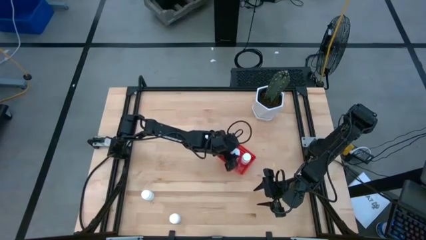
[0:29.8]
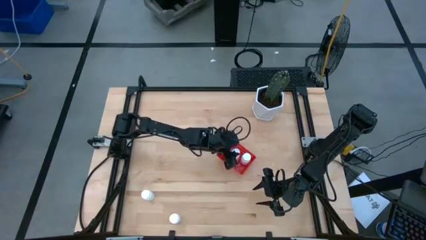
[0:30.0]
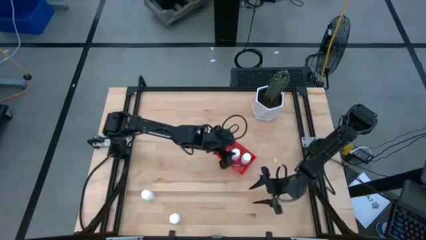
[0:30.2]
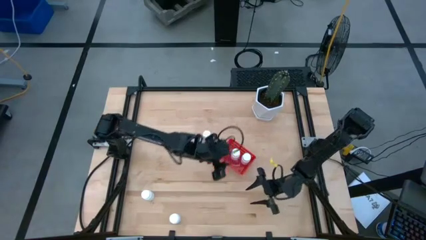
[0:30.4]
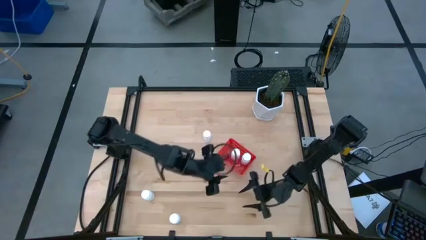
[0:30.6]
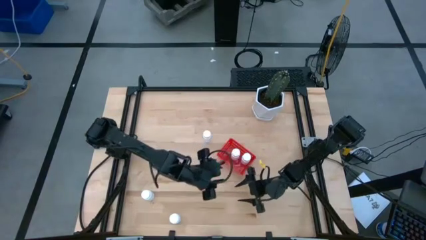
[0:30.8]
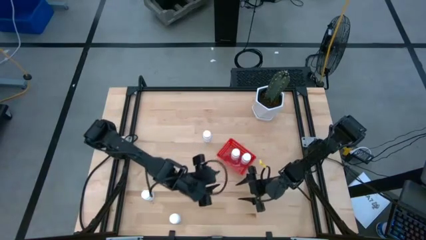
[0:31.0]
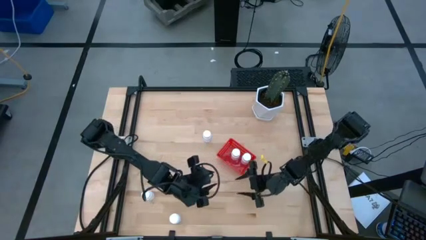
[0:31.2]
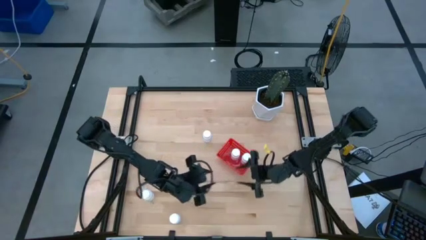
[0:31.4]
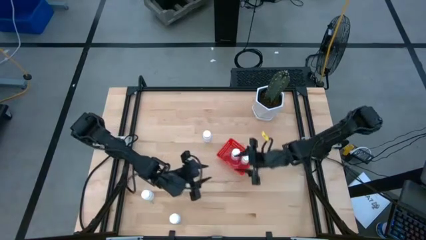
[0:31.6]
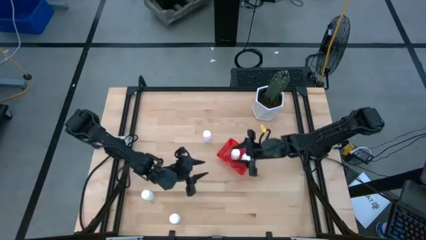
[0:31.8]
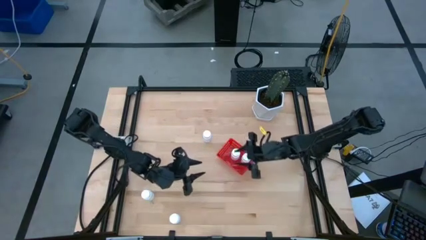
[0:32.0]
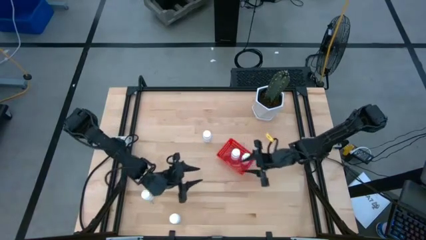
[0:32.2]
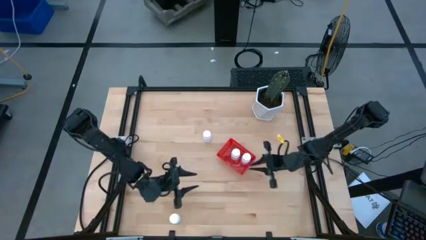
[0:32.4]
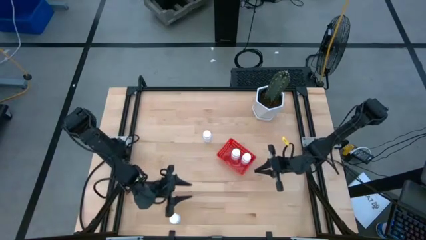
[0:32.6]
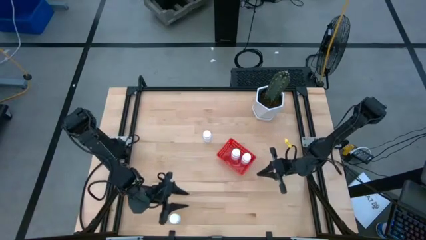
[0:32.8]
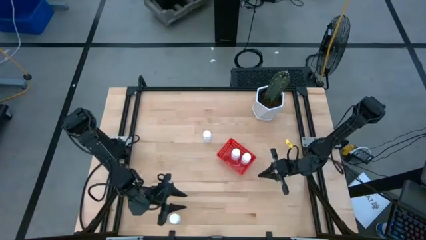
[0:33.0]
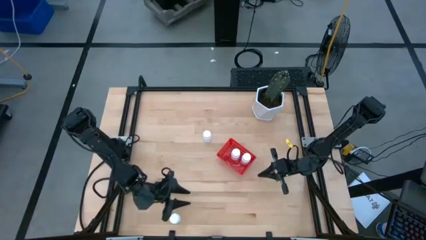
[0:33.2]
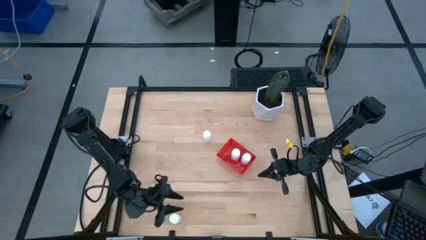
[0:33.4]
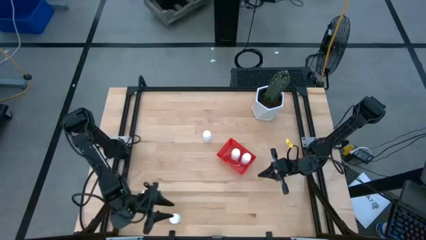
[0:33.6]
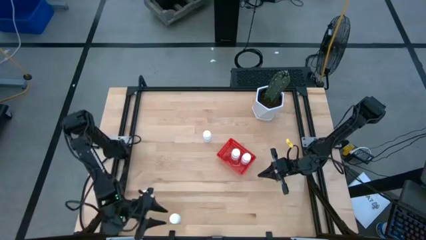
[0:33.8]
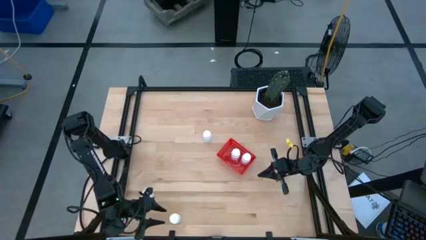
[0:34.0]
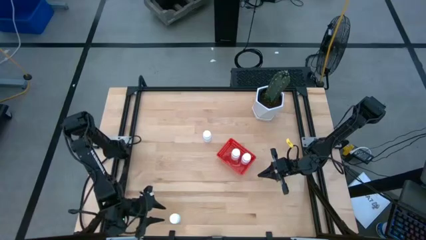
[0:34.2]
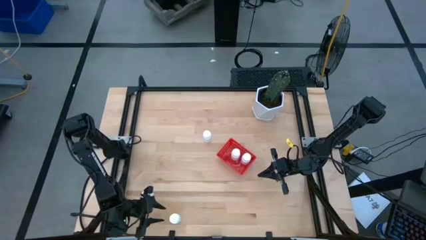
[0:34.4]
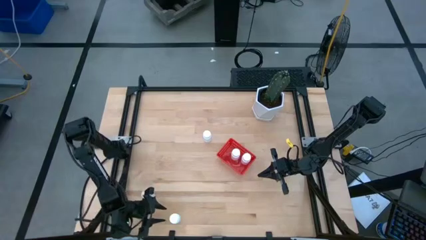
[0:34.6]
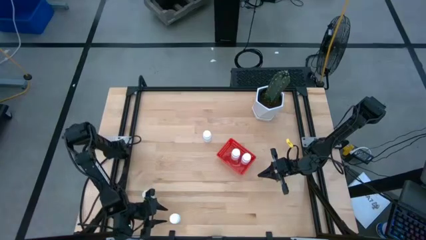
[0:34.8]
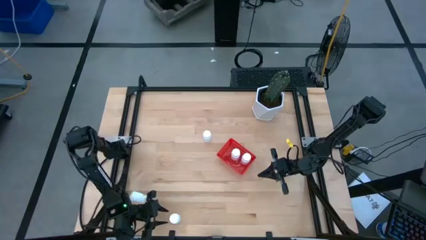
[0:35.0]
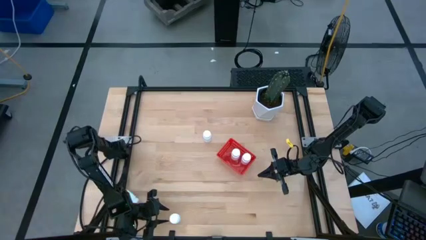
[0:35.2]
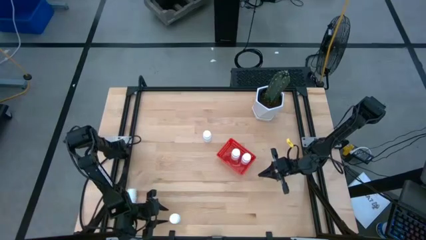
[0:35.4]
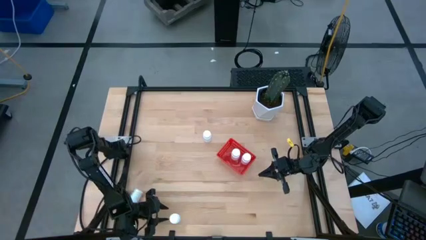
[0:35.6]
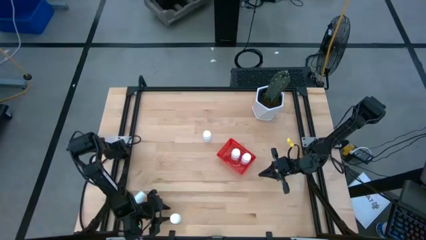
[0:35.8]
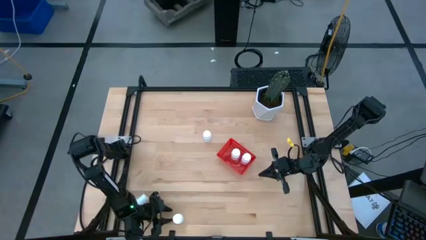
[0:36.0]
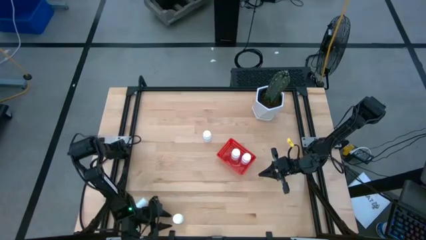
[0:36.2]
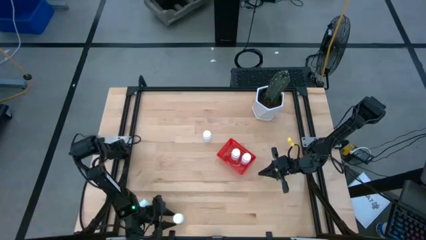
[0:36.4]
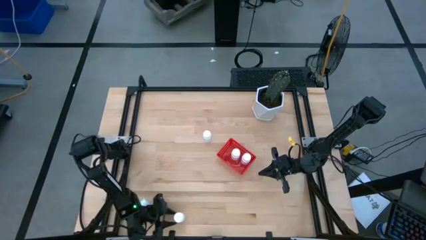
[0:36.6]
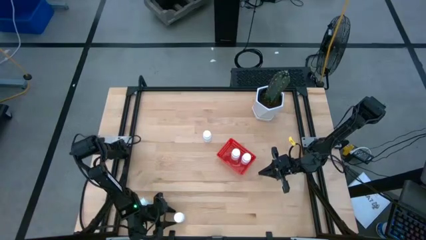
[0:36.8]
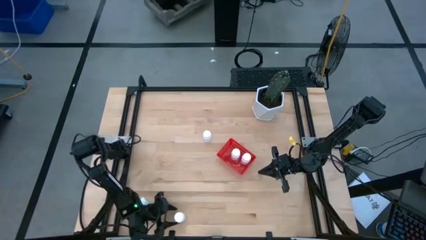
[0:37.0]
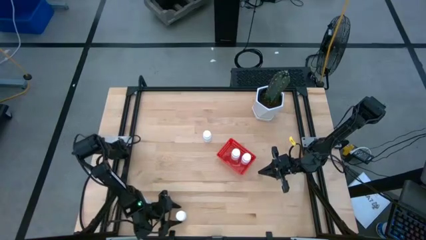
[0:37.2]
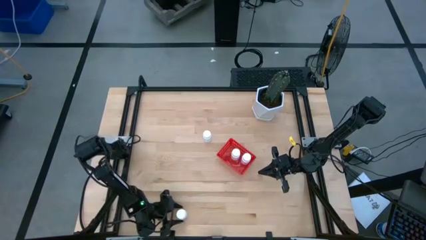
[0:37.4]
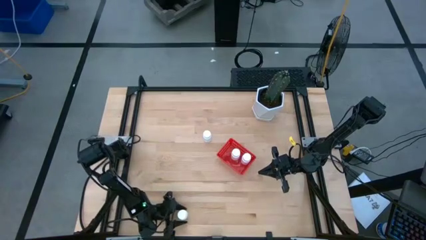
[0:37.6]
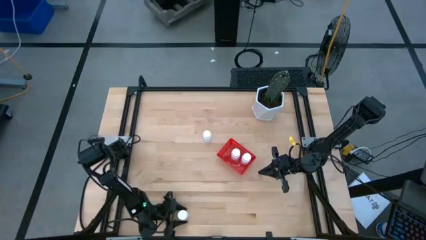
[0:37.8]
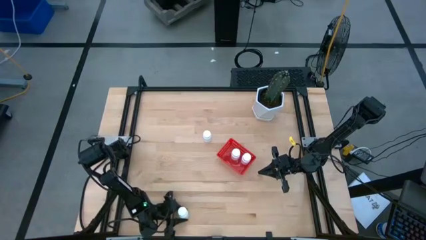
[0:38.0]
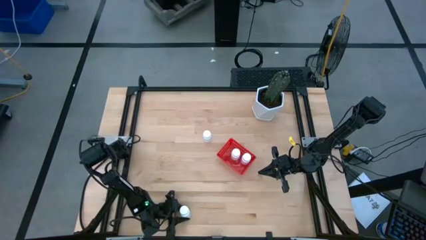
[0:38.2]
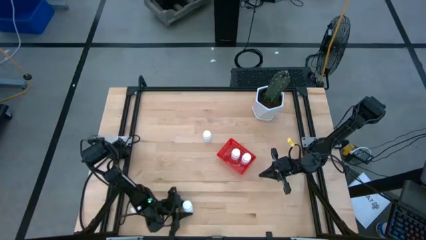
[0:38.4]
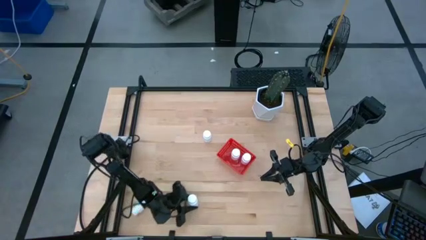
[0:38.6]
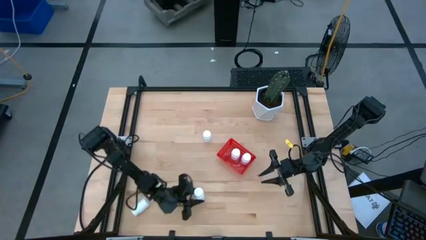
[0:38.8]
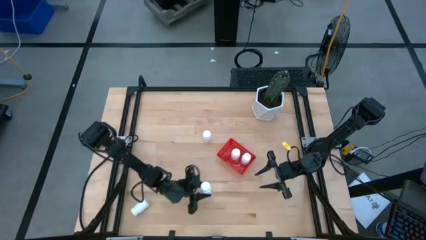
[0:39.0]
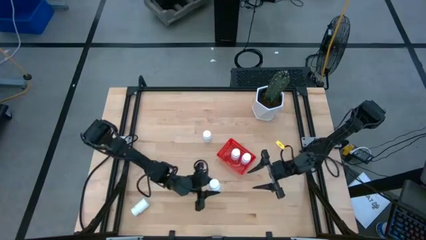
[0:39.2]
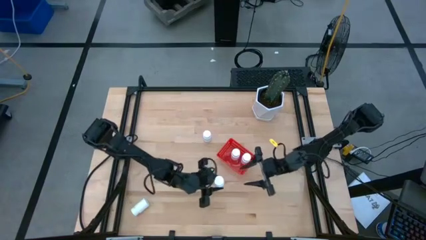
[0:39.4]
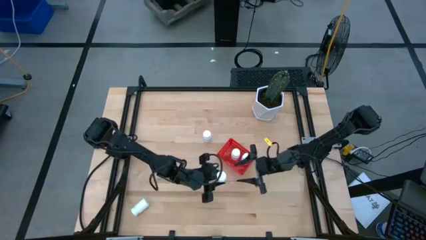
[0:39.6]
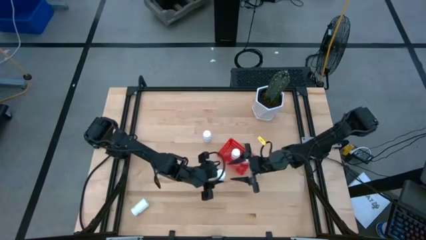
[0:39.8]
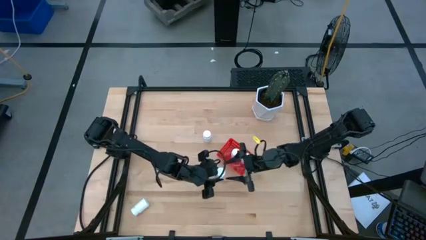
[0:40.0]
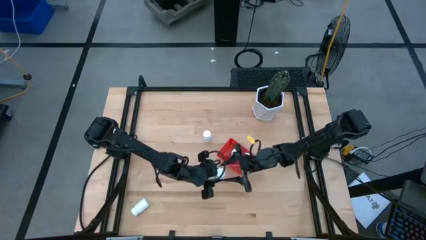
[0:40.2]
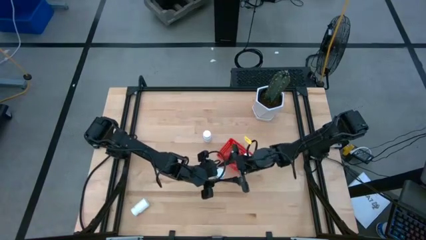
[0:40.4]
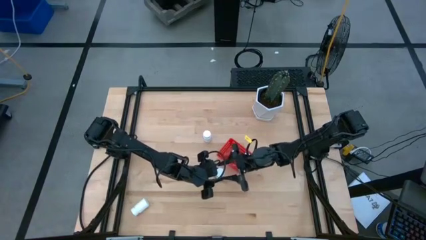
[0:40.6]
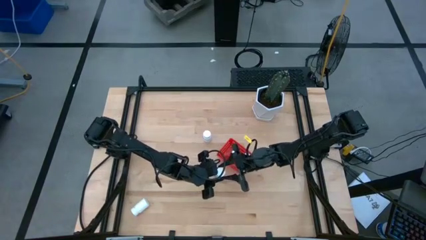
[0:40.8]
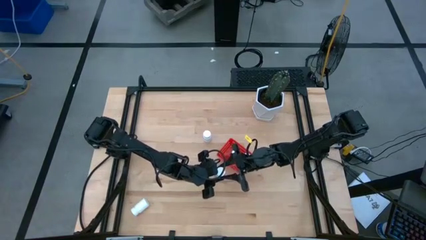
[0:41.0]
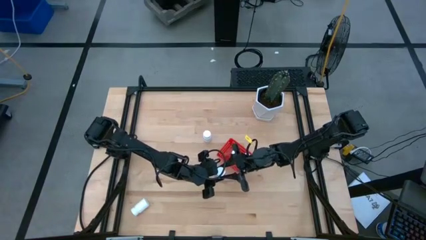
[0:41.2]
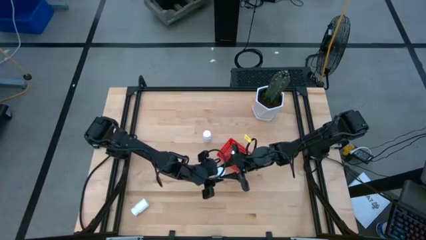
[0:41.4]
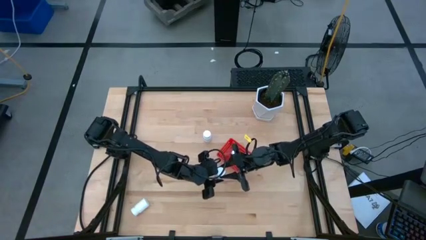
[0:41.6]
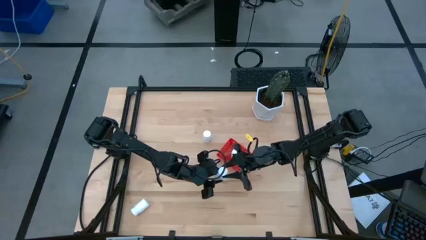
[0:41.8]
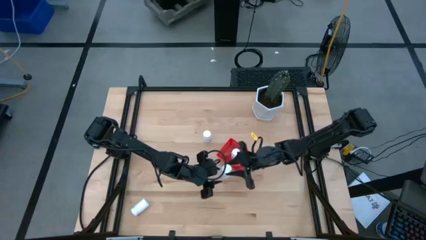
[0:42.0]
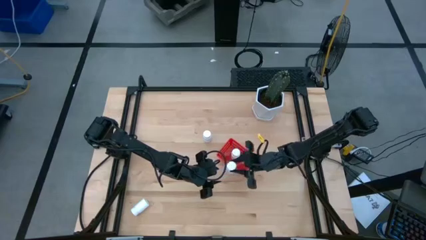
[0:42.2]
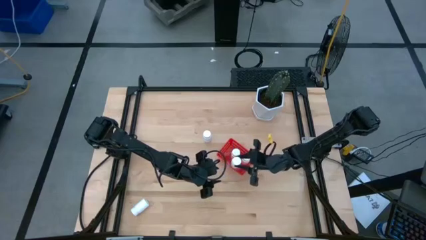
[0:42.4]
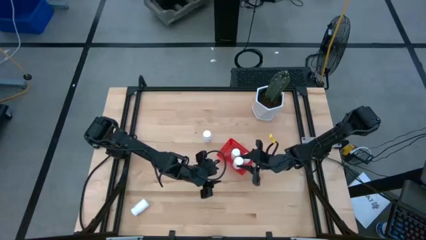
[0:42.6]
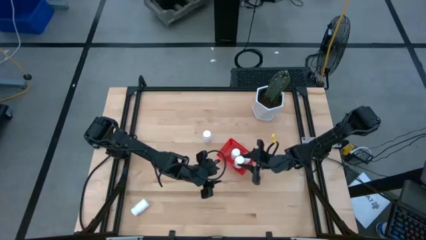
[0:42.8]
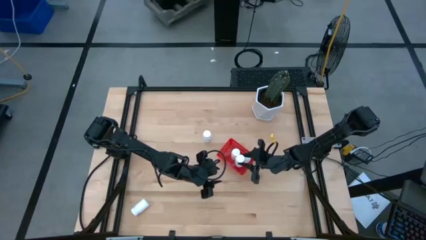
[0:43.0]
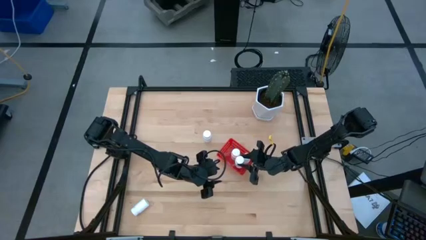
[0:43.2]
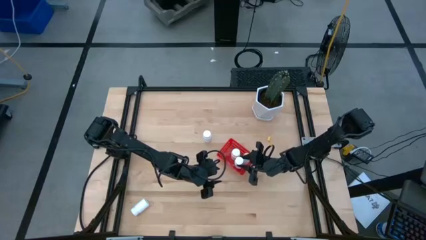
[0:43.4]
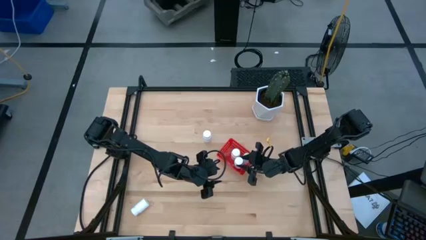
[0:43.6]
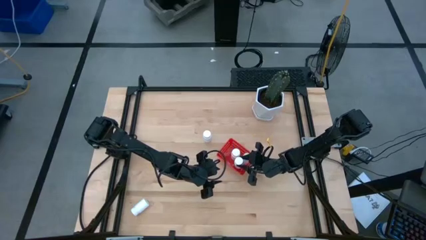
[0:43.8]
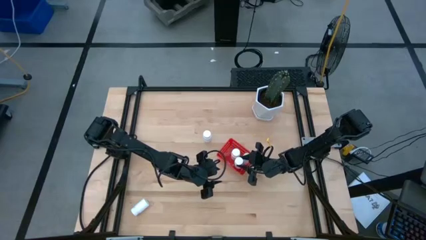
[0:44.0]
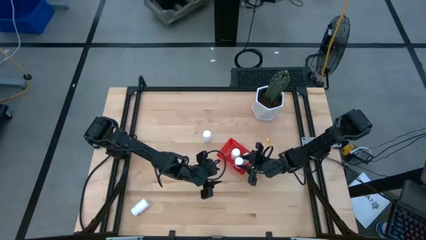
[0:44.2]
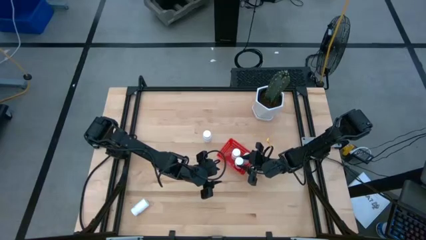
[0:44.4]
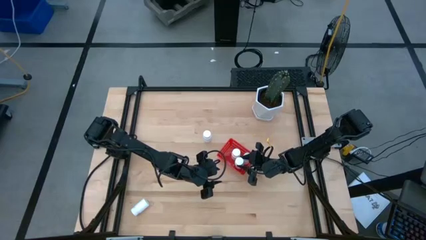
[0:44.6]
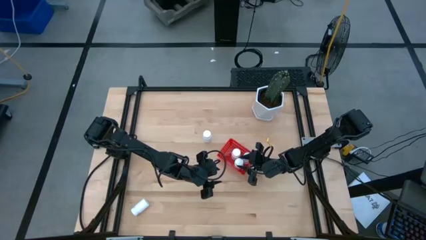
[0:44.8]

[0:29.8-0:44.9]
Task: Pick and place pill bottles into a basket
Put the white pill bottle into the red bin

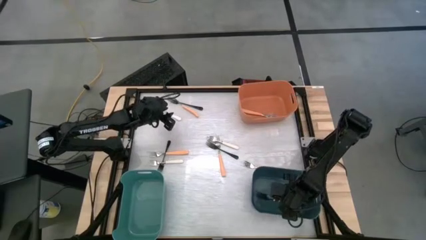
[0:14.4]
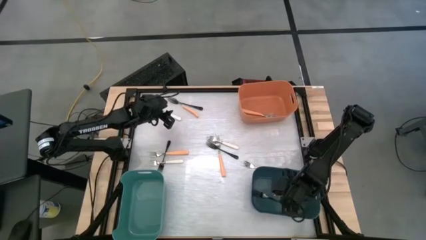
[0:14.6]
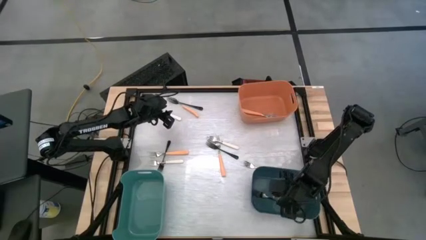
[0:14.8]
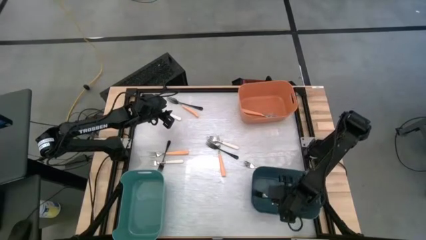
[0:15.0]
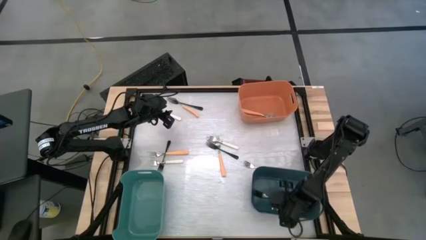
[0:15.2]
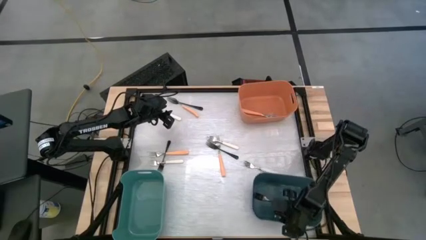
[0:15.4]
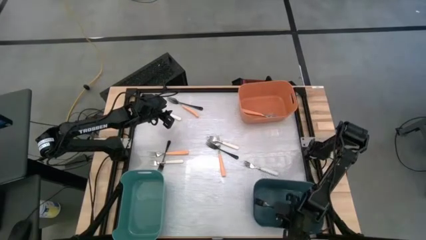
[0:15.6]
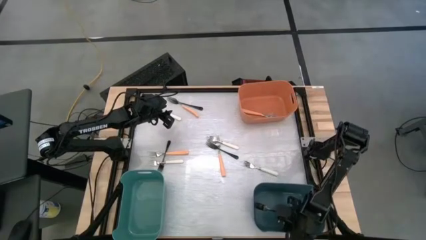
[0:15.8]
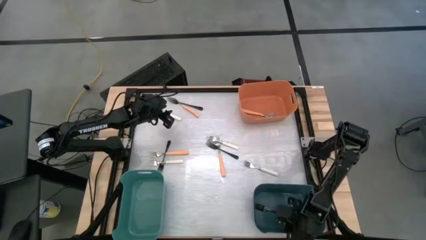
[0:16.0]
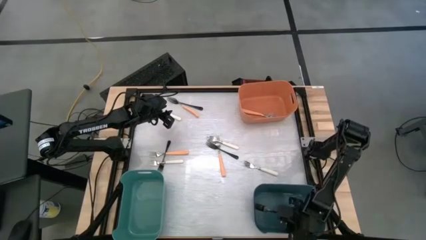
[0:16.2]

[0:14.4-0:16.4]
Task: Sort silverware by color (type)
Adjust the blue bin on the table
